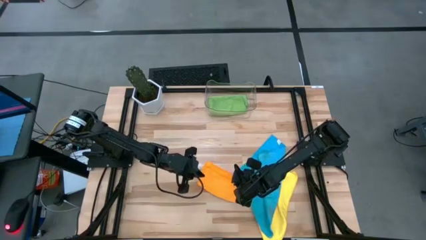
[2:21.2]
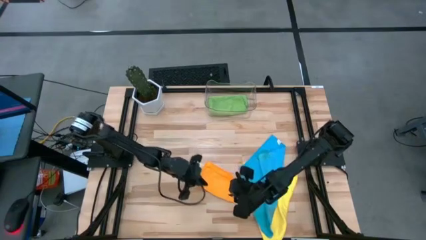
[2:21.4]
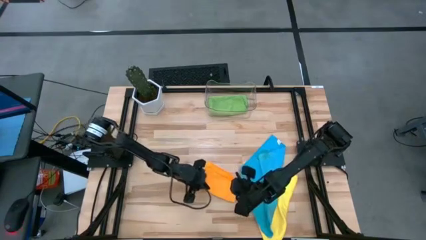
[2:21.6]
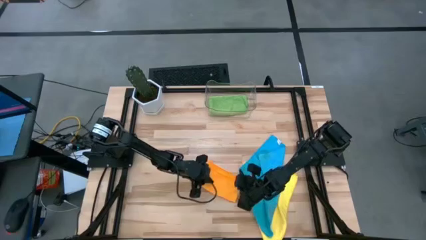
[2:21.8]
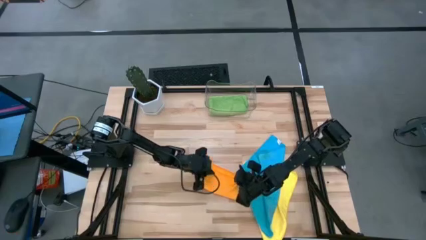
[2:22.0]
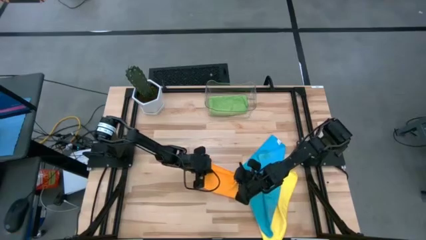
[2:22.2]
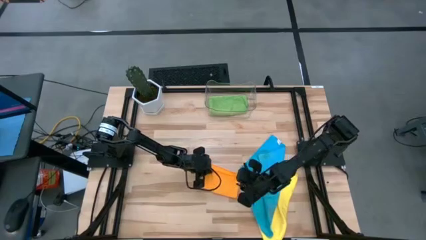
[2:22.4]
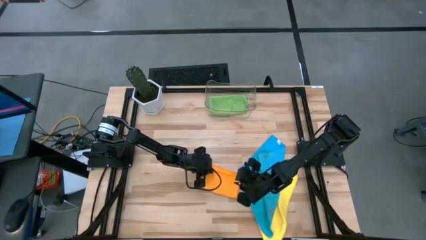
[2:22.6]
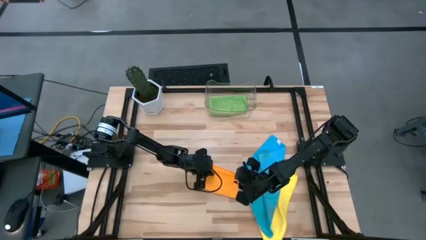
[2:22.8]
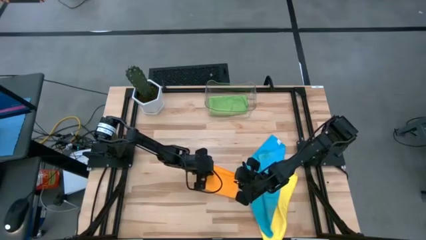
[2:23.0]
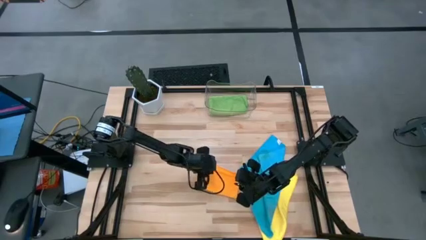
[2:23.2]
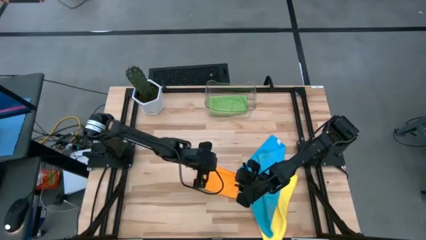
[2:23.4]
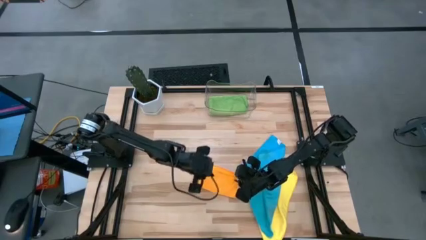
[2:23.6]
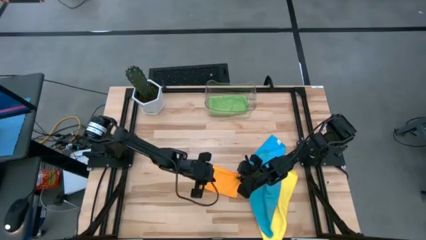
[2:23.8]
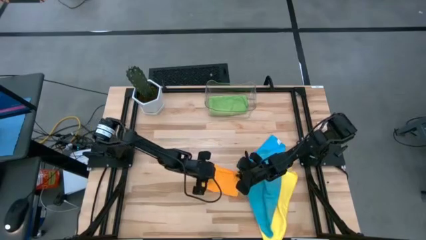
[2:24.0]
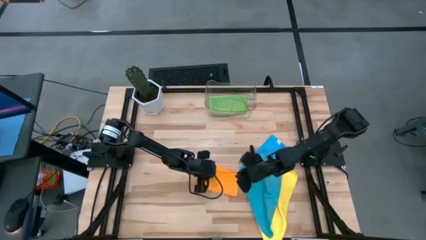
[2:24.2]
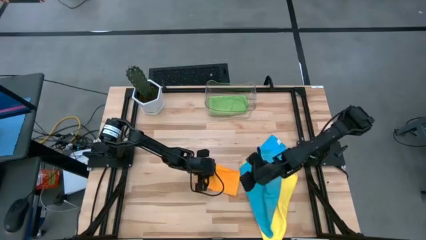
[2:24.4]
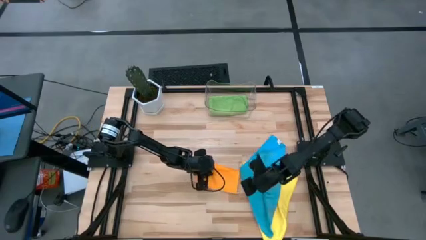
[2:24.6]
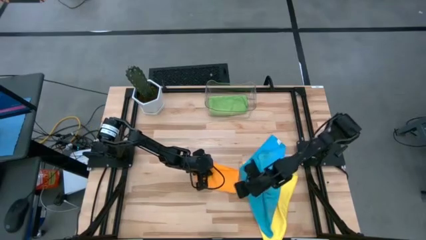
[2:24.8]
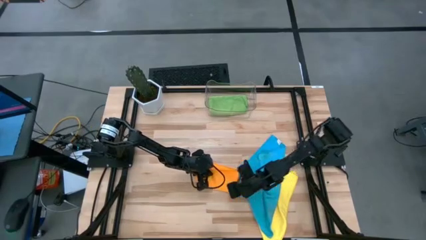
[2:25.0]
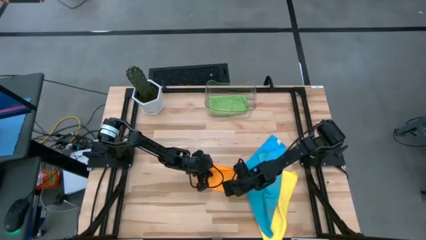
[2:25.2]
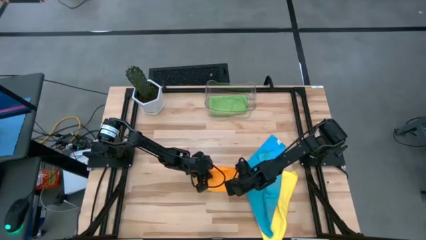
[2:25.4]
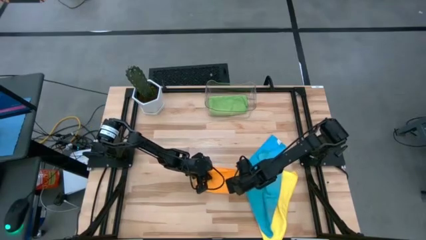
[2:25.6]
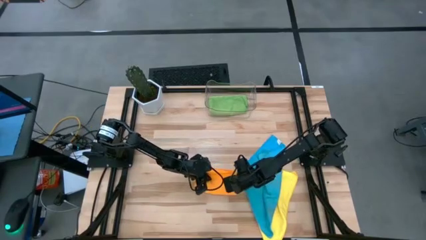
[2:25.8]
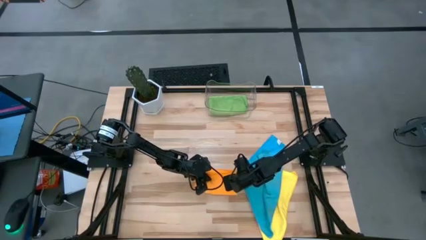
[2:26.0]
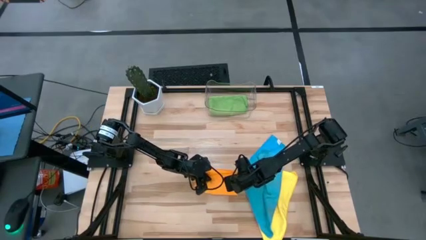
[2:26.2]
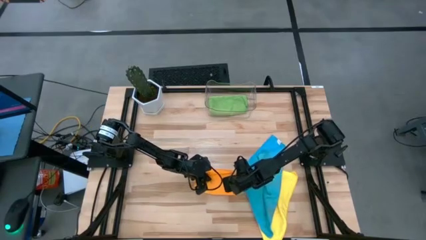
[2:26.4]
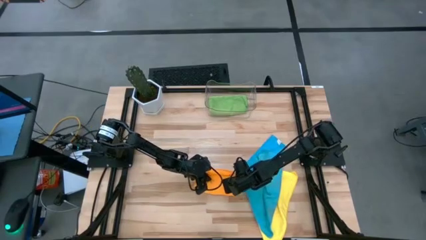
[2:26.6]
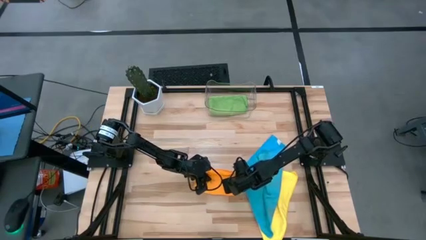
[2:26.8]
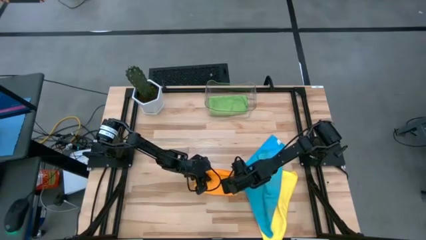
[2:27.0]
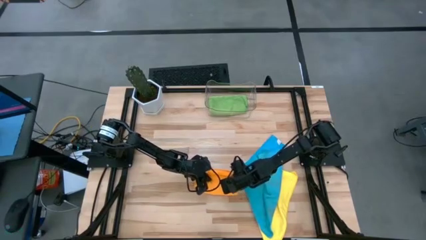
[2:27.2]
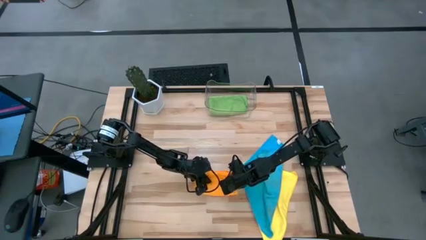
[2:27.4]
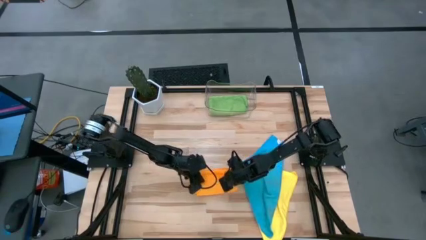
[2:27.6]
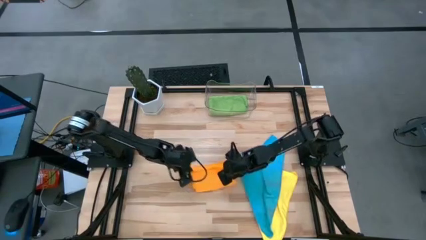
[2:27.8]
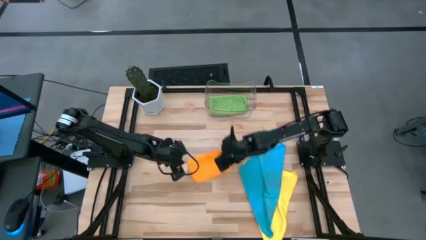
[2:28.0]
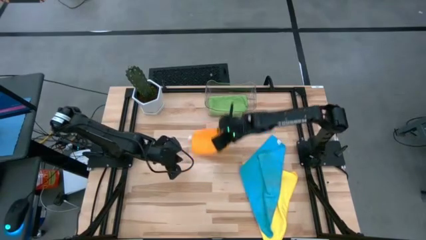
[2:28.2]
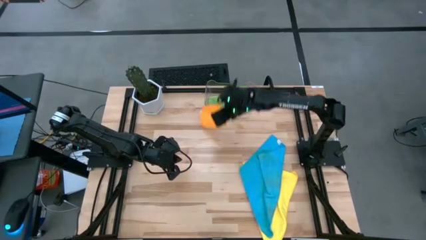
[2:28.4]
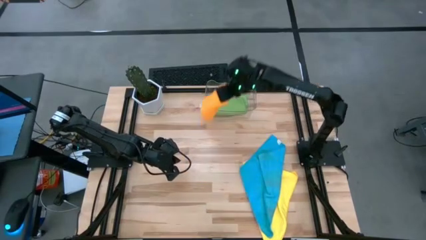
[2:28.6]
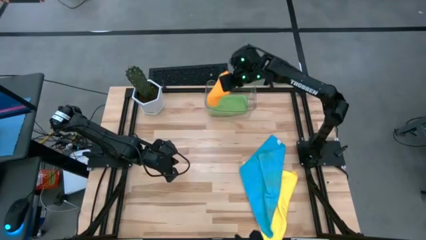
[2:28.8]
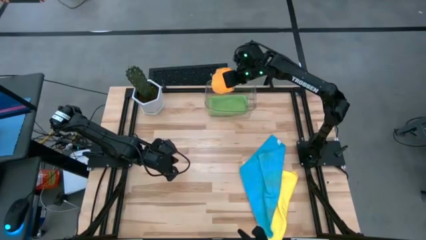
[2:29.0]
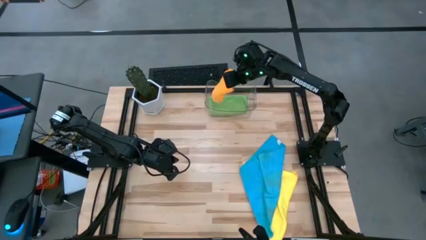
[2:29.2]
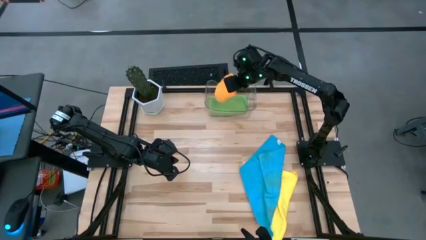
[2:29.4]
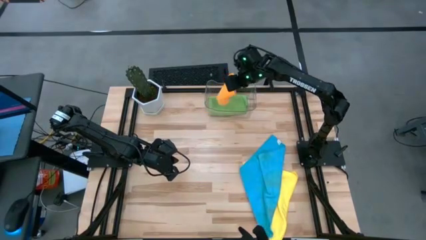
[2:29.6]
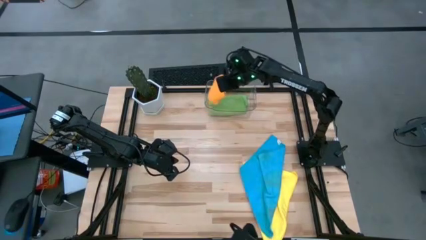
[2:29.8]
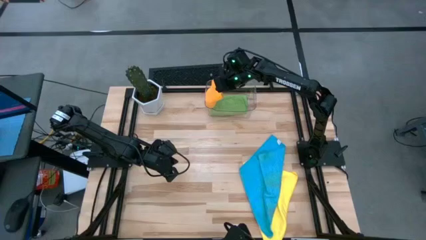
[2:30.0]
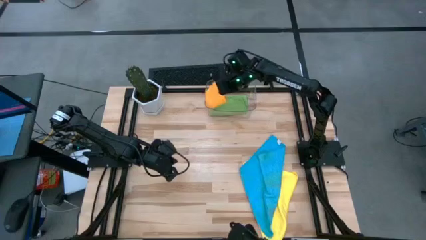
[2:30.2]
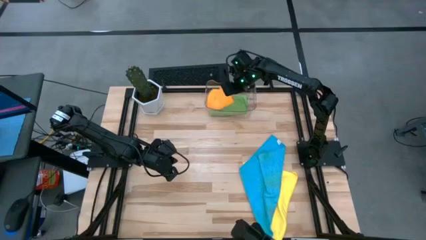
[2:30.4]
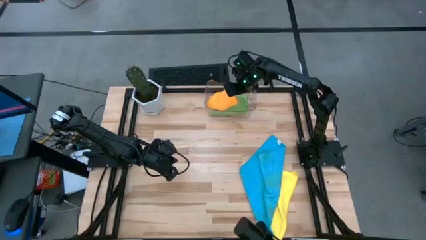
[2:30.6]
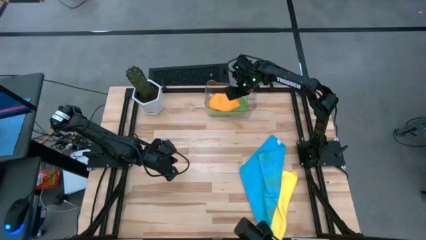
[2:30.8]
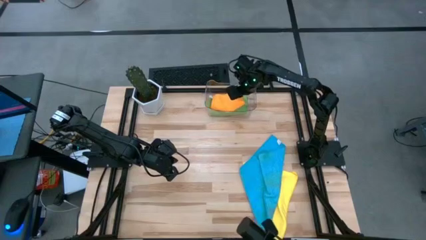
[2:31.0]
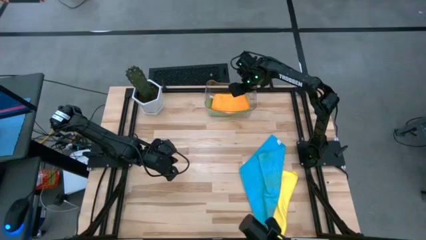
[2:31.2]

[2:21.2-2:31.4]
Task: Fold microfiber towels
Put the orange towel into the transparent bin
